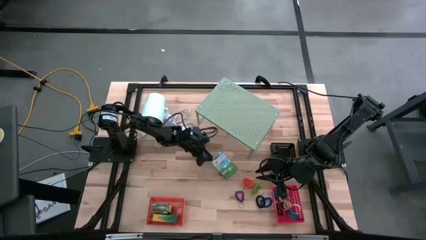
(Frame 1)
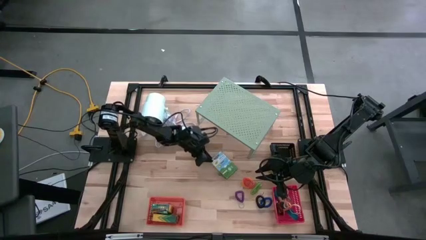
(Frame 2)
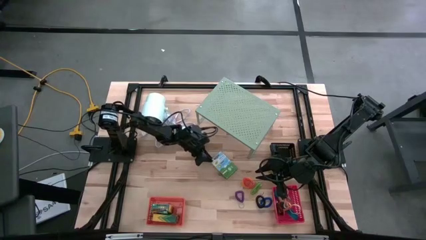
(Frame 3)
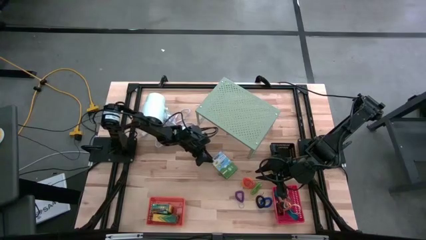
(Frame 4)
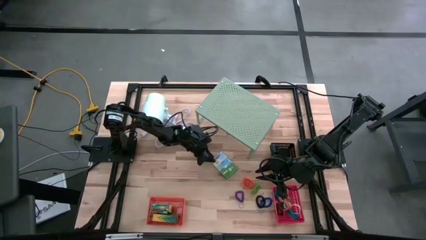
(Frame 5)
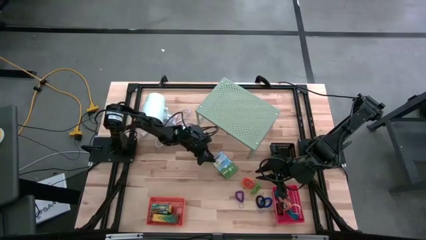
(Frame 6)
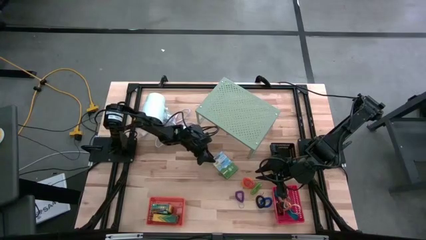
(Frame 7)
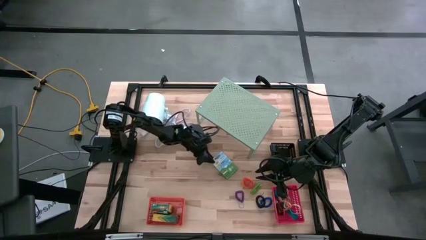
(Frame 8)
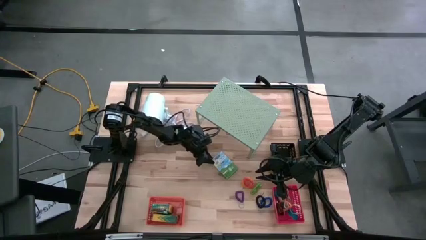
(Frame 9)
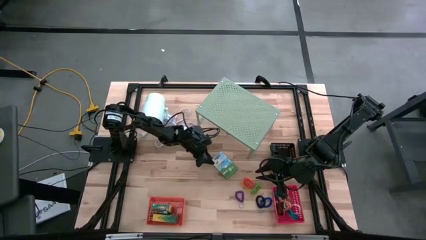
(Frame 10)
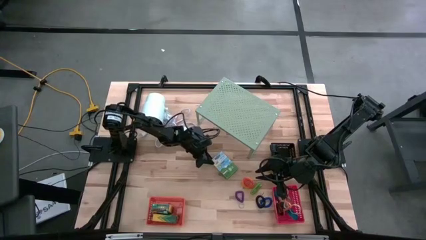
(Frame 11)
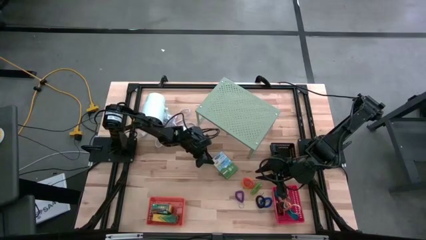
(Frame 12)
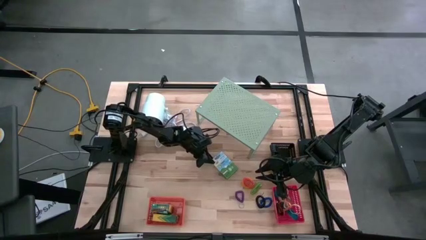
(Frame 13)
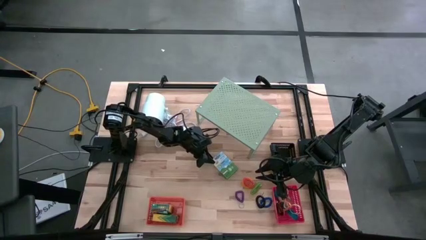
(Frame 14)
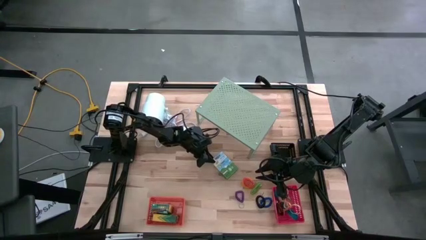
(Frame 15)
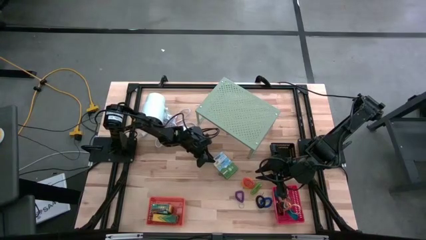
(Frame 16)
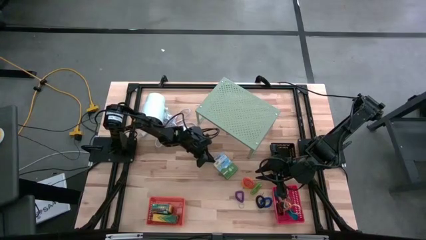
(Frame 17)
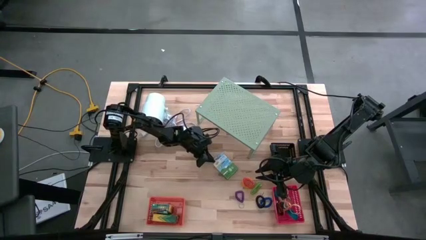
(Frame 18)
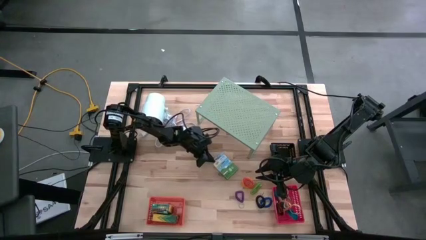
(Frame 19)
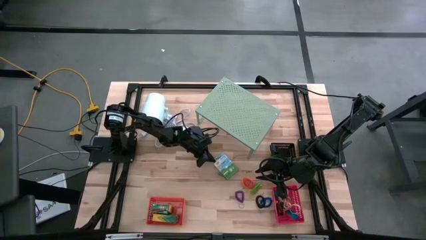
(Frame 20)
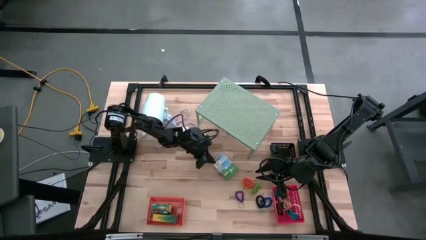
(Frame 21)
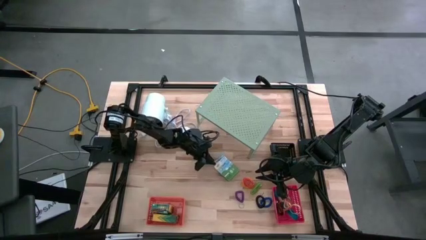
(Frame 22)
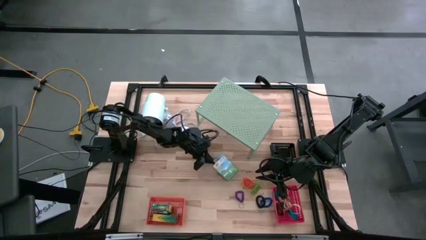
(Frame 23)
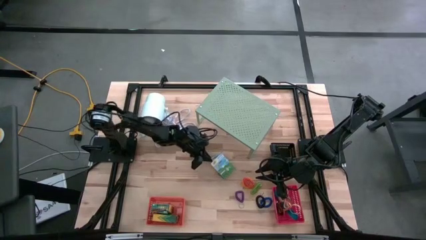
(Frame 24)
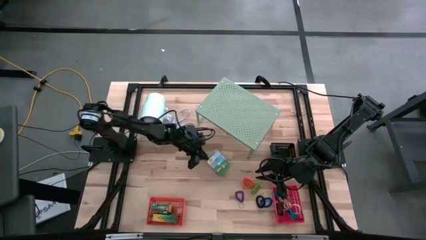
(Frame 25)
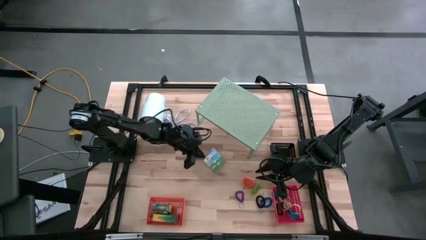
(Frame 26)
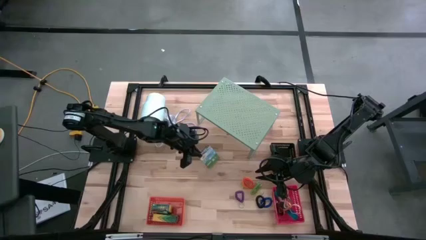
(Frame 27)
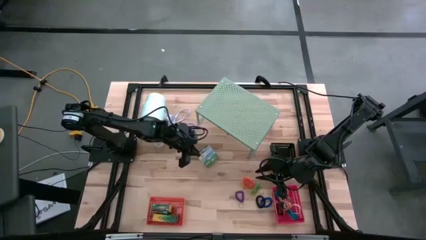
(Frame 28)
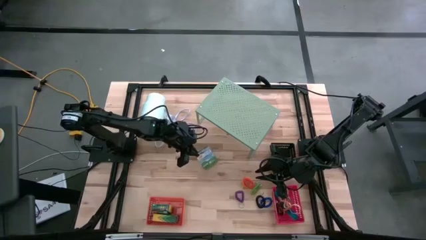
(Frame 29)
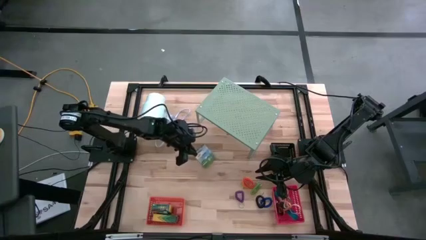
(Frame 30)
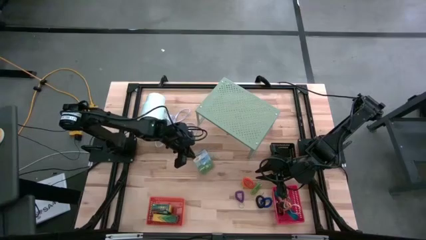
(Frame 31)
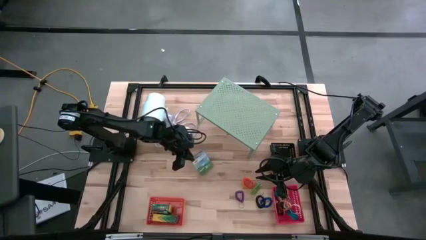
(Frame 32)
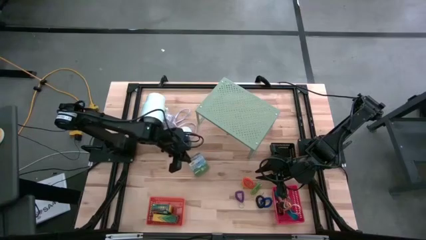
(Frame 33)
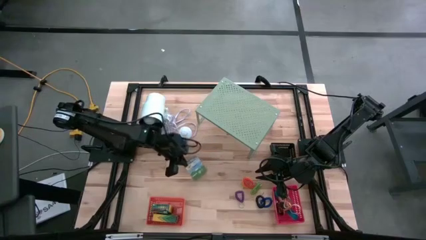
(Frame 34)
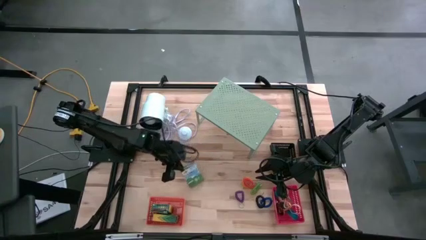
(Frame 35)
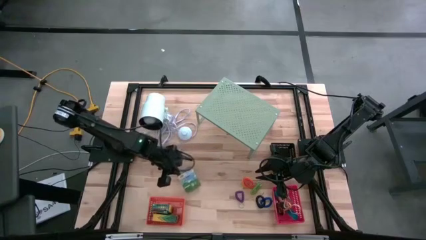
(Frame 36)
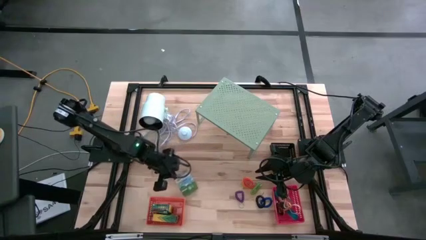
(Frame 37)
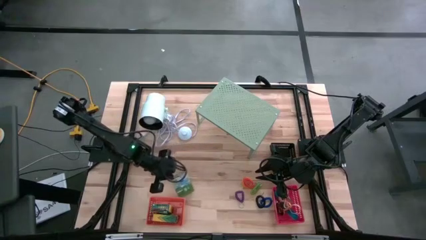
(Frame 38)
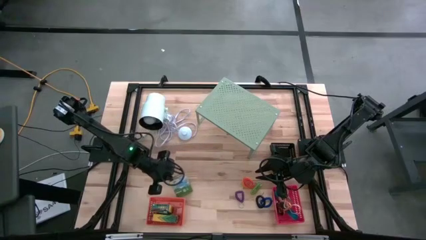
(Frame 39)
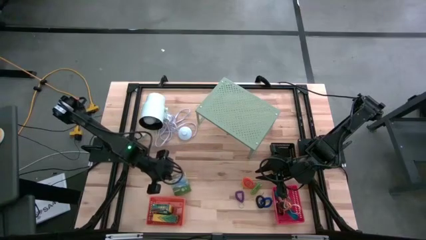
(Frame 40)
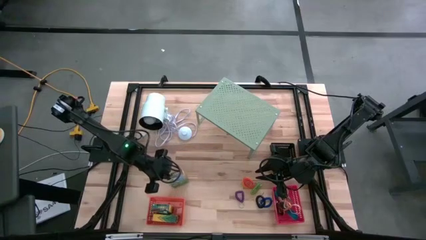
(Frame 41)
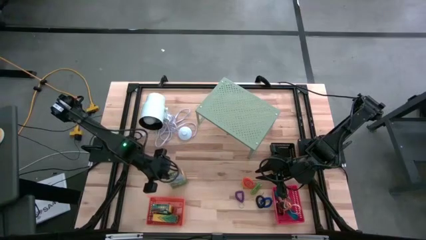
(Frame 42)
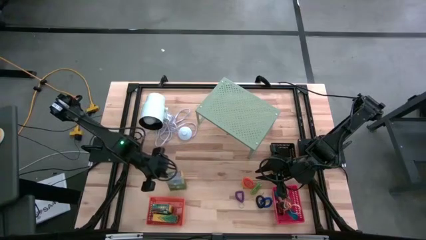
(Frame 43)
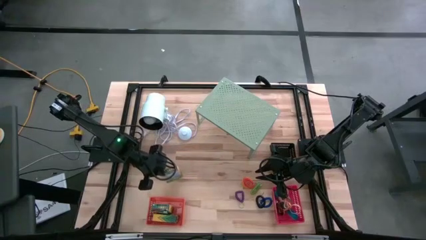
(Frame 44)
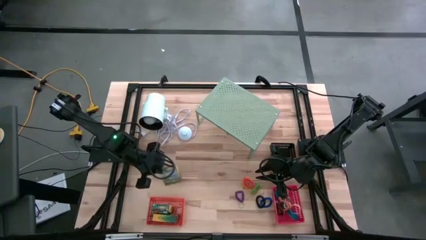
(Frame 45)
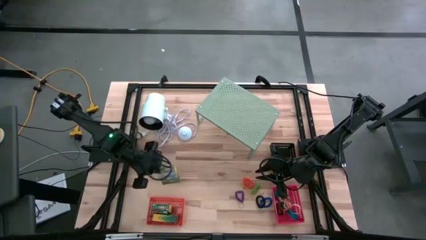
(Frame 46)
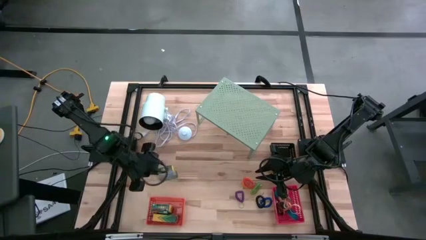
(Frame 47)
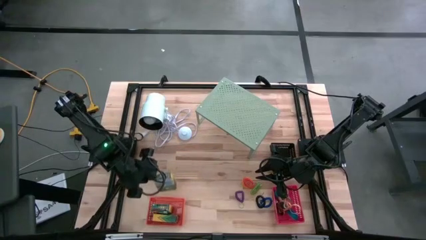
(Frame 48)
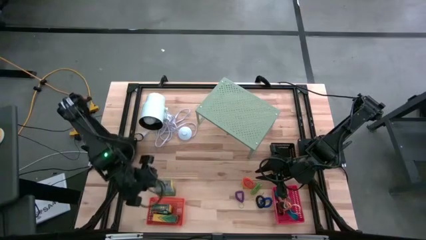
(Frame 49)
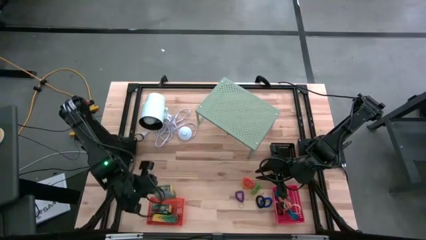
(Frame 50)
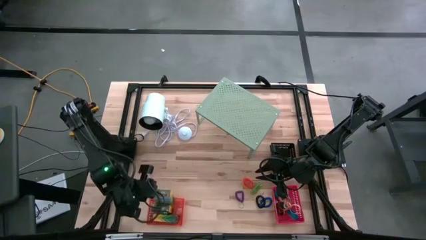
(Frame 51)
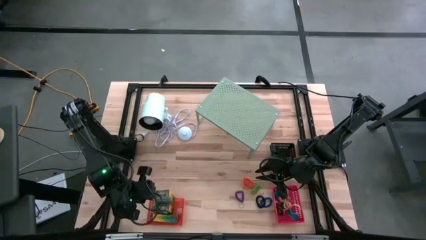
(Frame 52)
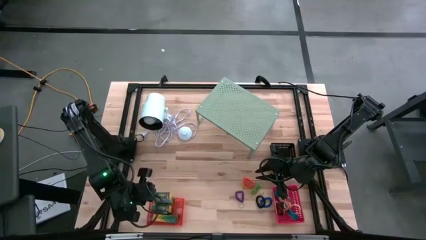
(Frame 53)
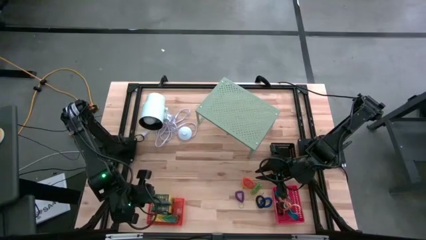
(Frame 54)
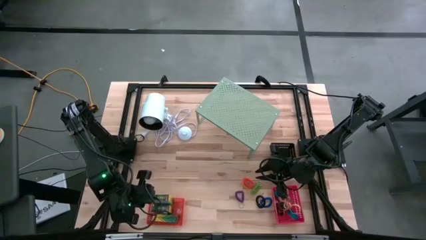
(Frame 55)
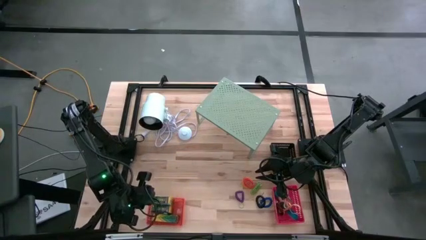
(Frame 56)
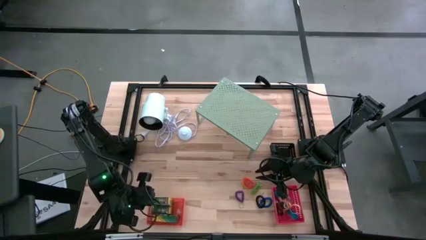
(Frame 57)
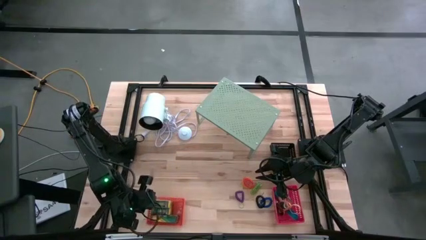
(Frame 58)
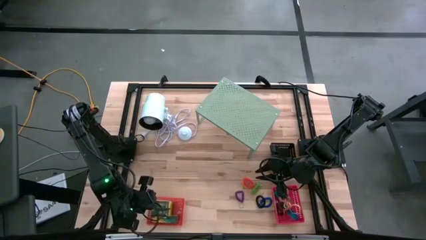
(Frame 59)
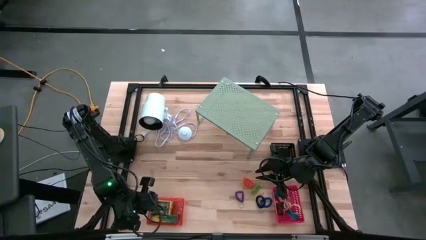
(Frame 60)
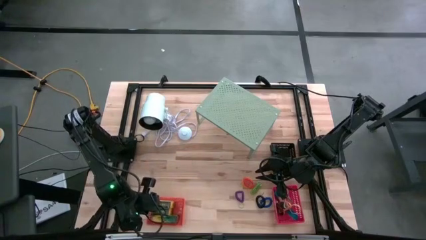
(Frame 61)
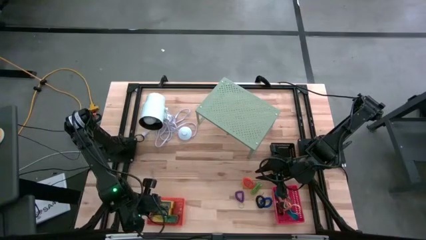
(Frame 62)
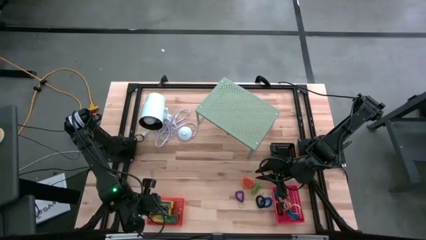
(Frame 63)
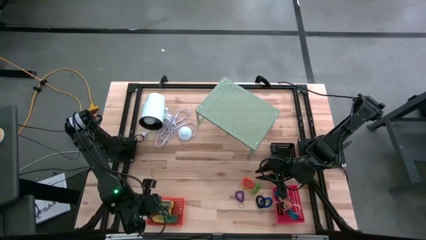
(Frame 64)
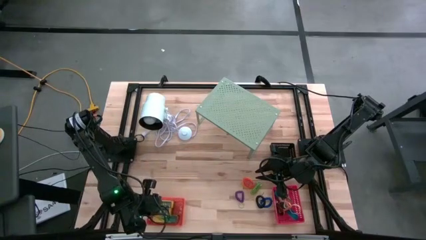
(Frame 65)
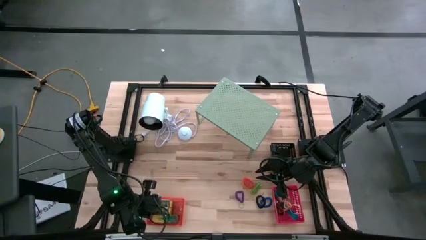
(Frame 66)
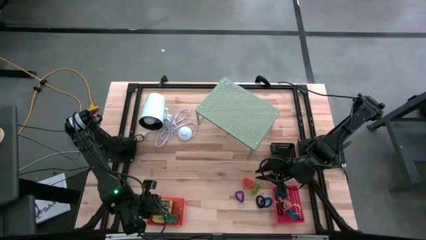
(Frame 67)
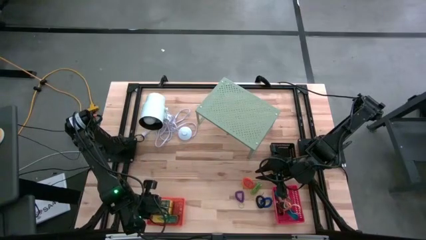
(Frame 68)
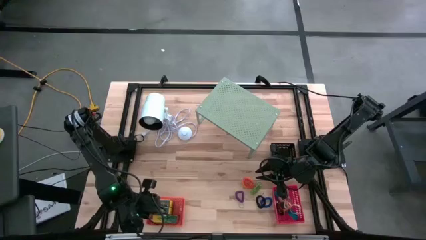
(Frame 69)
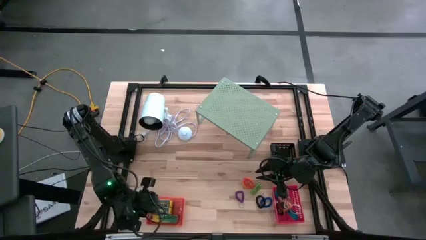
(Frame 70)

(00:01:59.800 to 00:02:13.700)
Task: Pick & Place Office Desk Supplies
Put the crayon box into the orange bin
